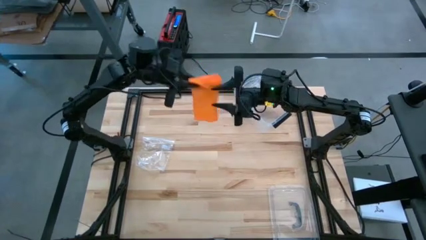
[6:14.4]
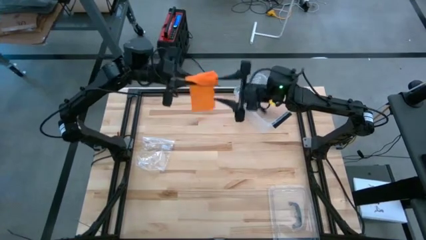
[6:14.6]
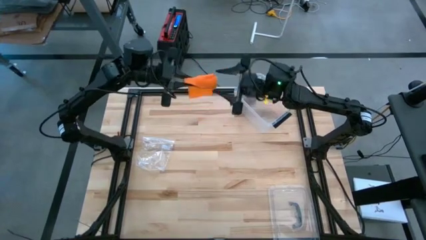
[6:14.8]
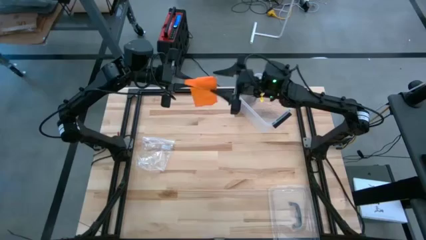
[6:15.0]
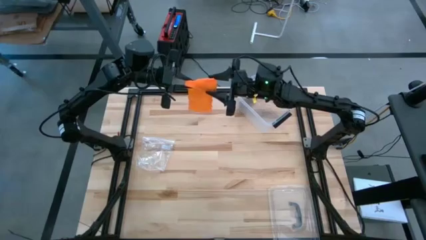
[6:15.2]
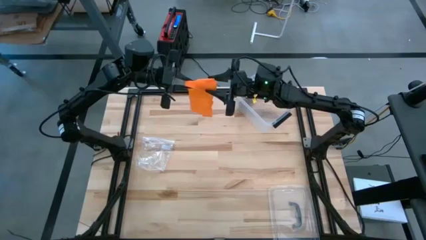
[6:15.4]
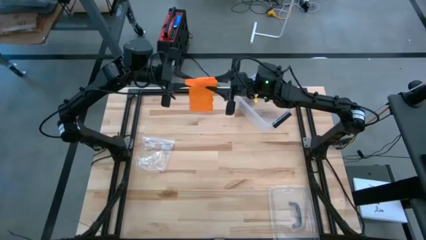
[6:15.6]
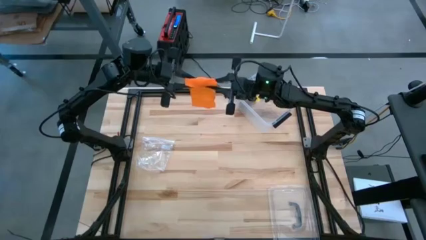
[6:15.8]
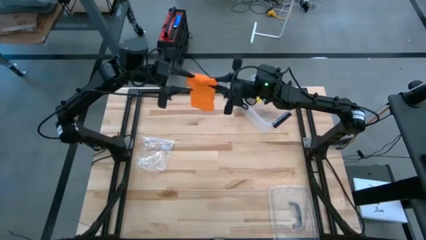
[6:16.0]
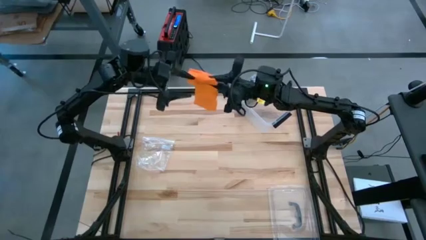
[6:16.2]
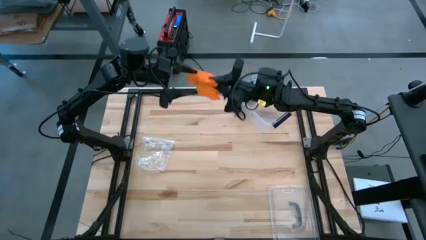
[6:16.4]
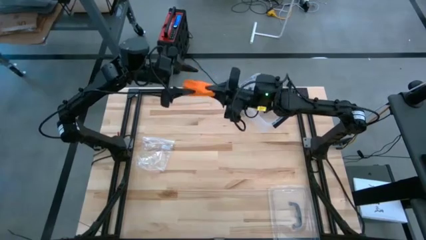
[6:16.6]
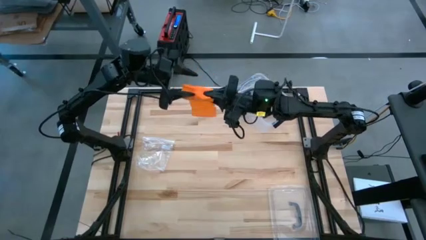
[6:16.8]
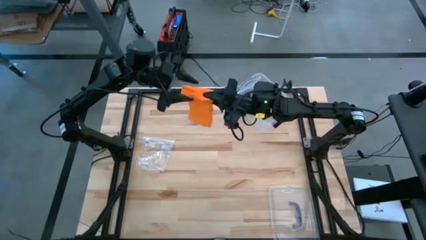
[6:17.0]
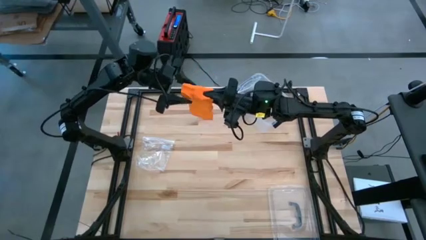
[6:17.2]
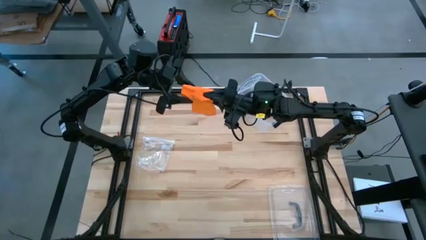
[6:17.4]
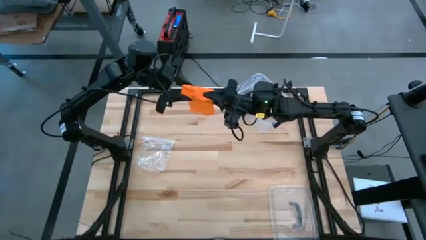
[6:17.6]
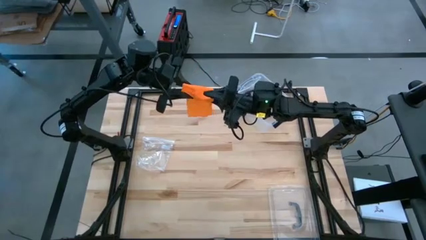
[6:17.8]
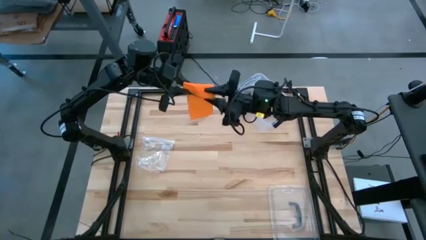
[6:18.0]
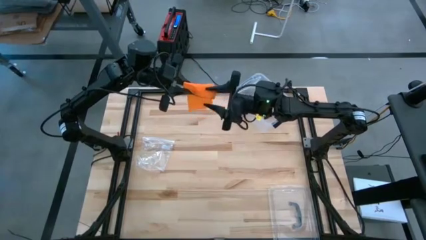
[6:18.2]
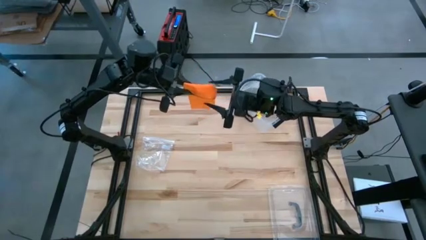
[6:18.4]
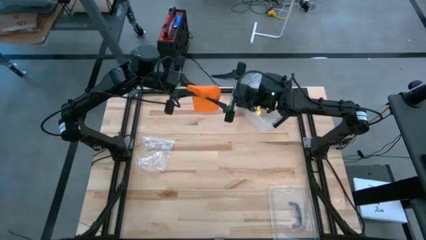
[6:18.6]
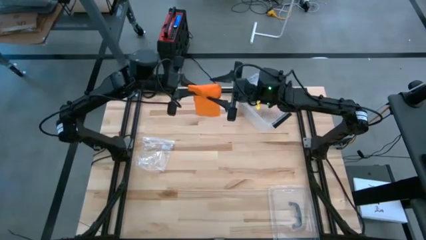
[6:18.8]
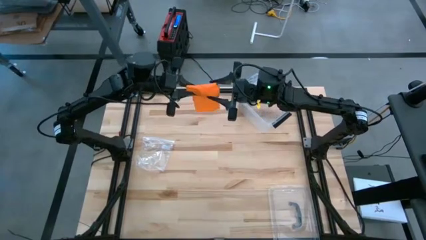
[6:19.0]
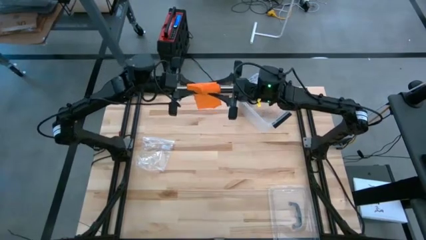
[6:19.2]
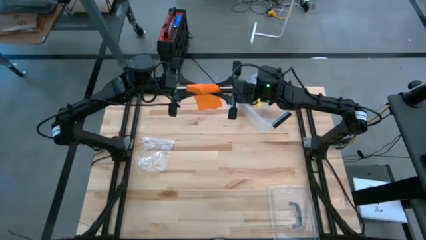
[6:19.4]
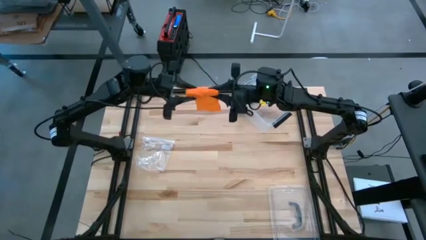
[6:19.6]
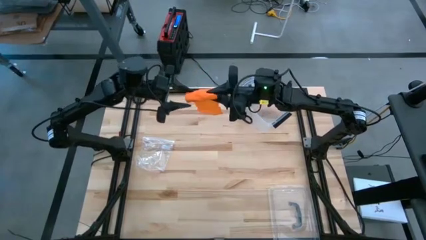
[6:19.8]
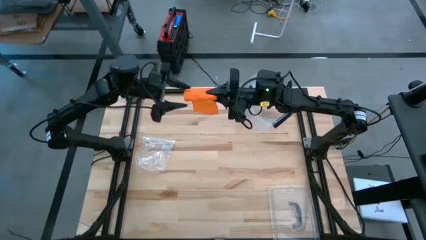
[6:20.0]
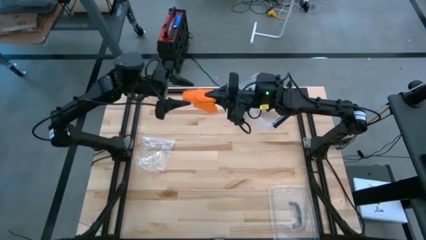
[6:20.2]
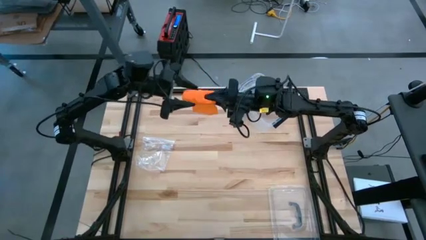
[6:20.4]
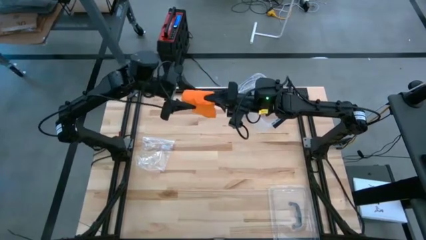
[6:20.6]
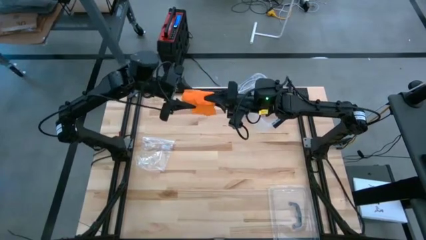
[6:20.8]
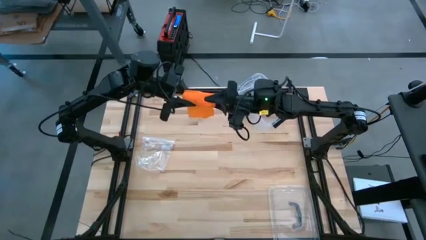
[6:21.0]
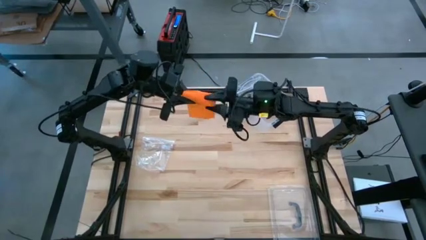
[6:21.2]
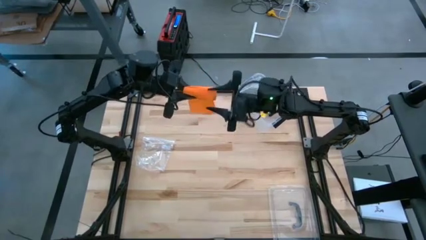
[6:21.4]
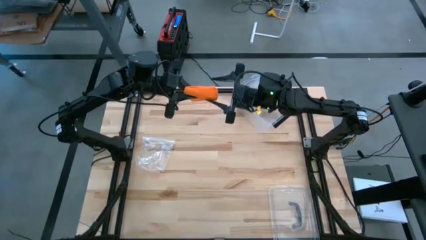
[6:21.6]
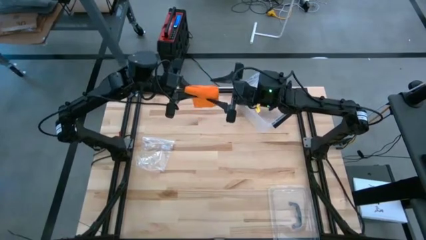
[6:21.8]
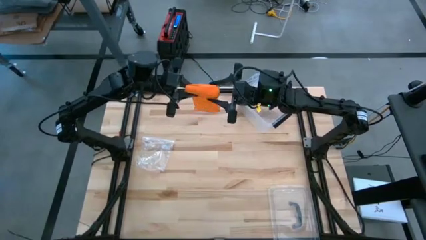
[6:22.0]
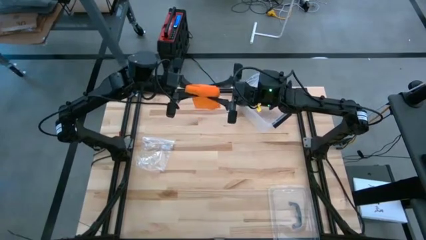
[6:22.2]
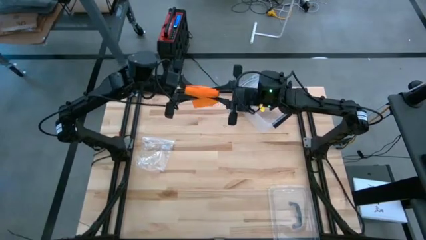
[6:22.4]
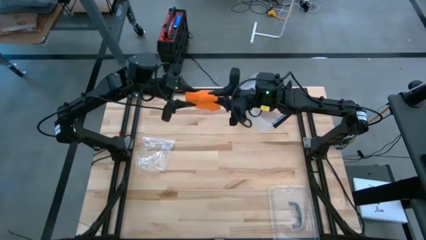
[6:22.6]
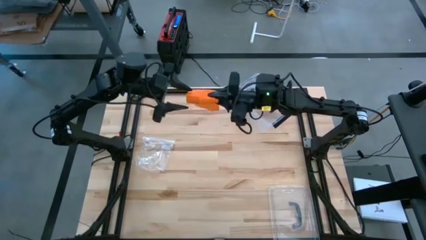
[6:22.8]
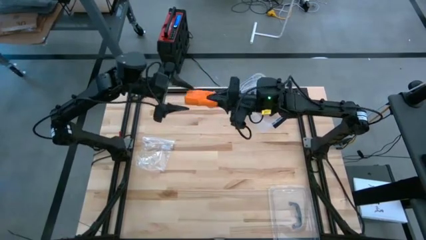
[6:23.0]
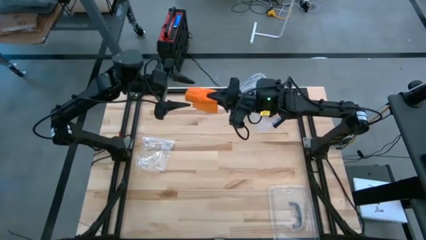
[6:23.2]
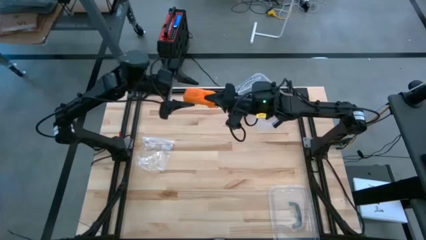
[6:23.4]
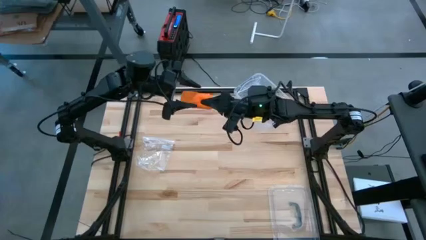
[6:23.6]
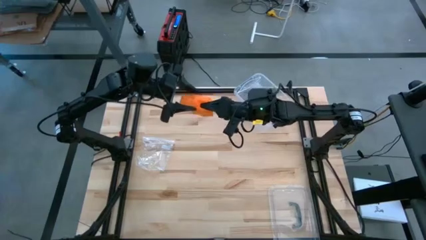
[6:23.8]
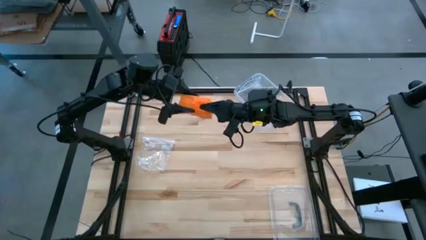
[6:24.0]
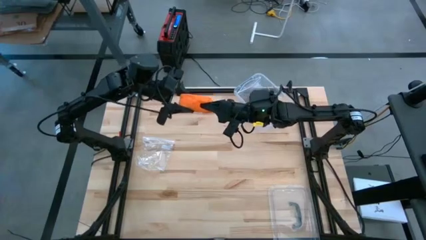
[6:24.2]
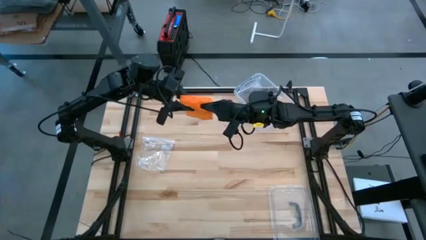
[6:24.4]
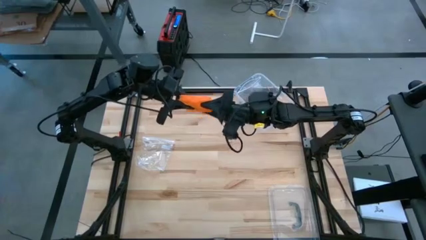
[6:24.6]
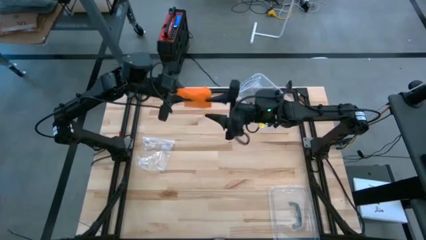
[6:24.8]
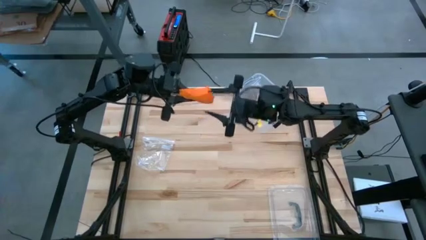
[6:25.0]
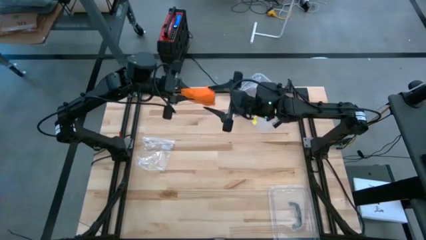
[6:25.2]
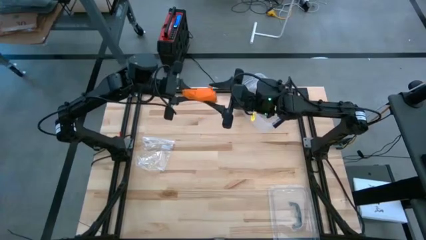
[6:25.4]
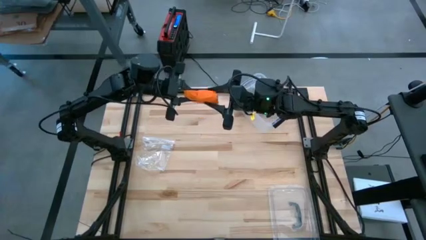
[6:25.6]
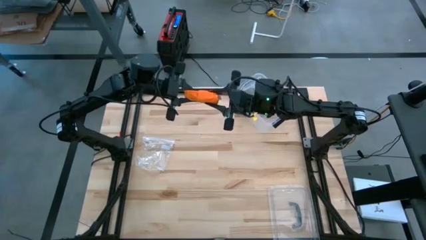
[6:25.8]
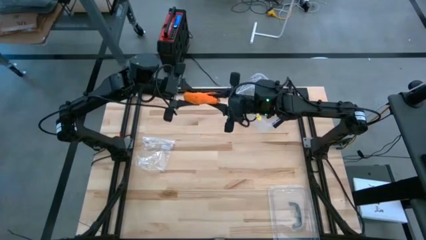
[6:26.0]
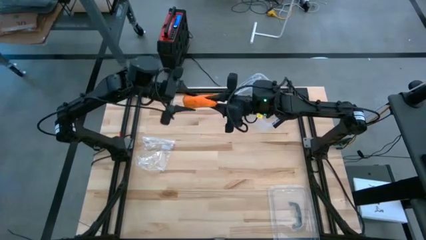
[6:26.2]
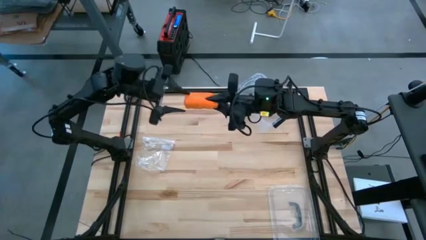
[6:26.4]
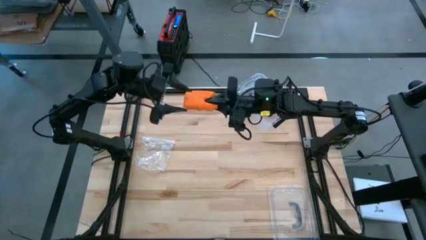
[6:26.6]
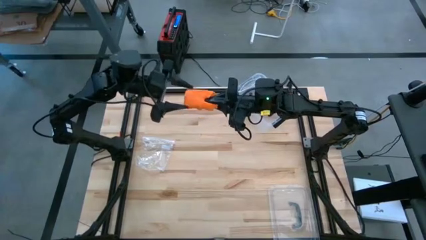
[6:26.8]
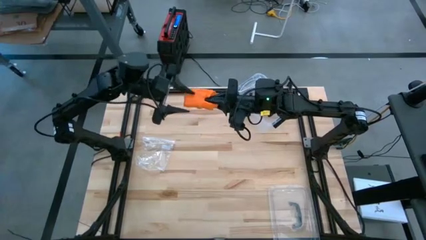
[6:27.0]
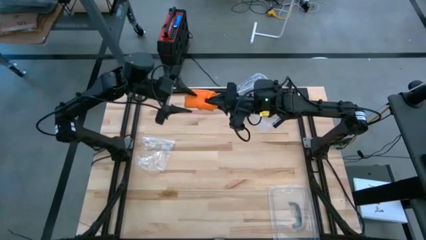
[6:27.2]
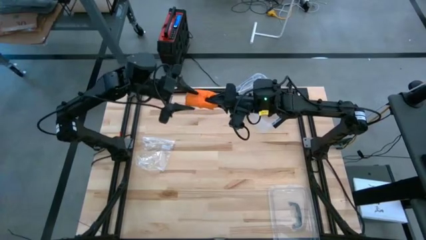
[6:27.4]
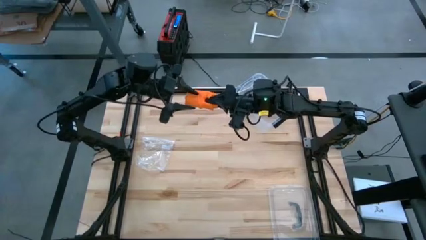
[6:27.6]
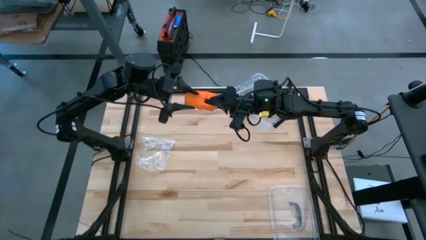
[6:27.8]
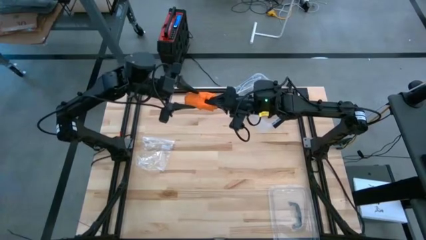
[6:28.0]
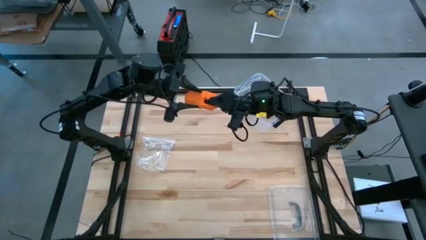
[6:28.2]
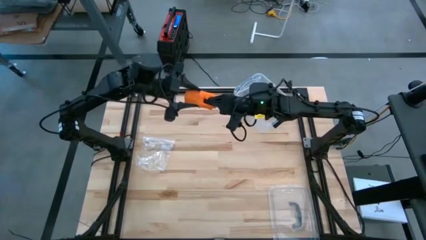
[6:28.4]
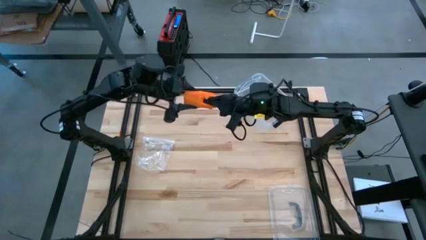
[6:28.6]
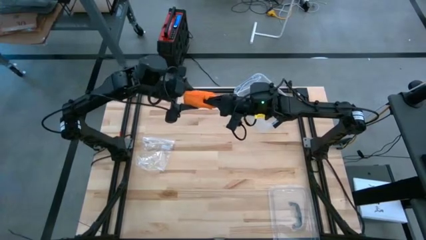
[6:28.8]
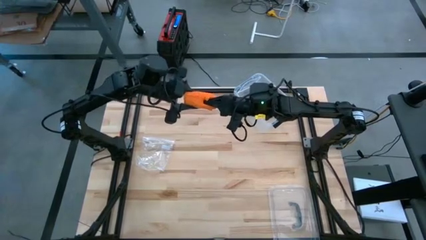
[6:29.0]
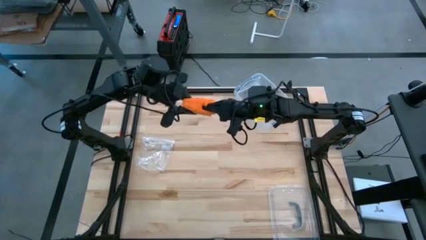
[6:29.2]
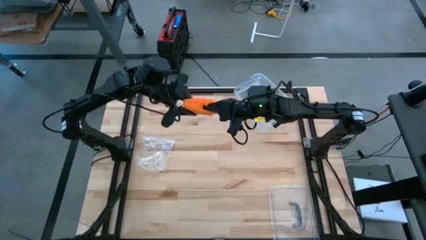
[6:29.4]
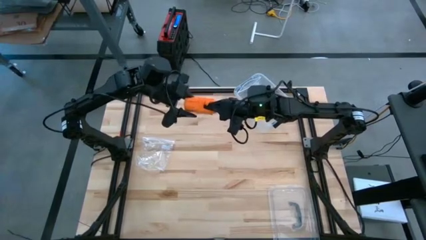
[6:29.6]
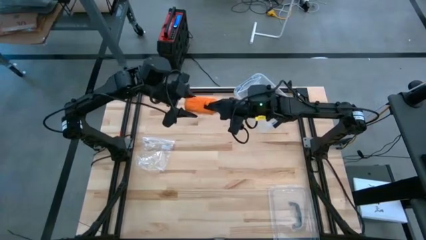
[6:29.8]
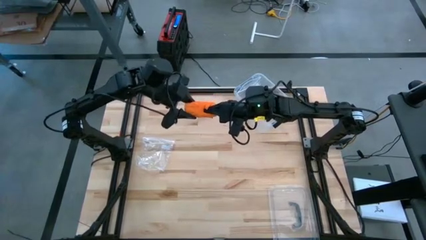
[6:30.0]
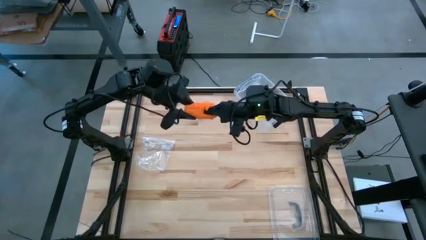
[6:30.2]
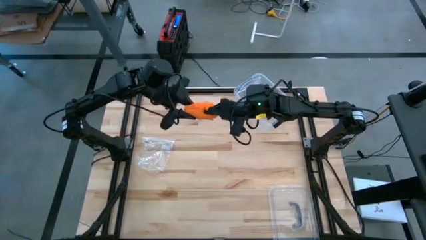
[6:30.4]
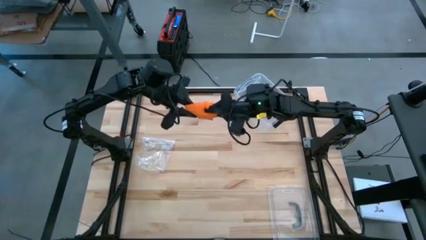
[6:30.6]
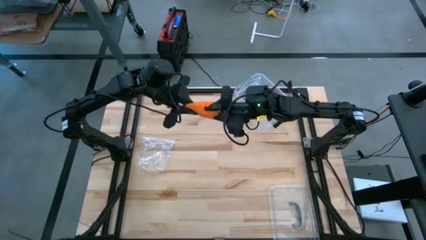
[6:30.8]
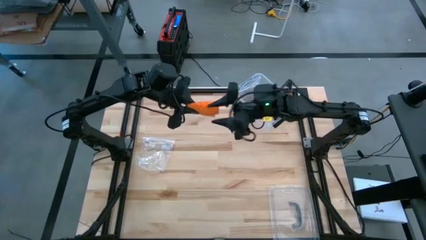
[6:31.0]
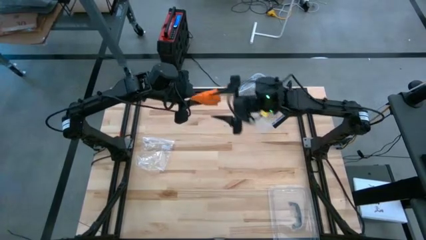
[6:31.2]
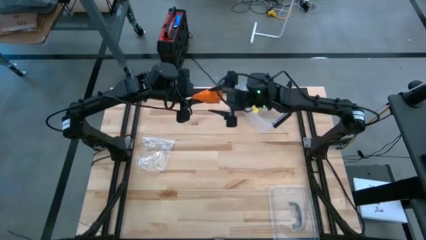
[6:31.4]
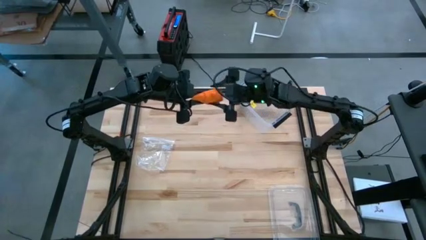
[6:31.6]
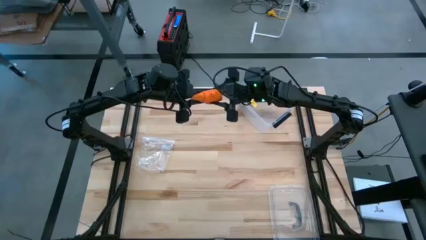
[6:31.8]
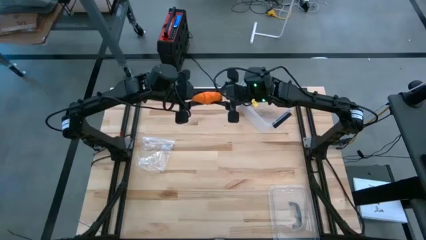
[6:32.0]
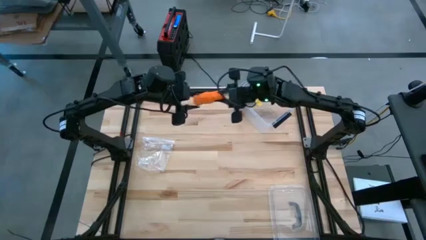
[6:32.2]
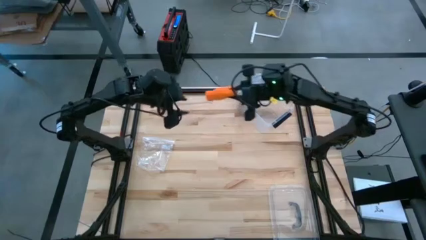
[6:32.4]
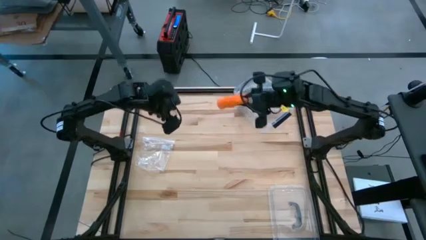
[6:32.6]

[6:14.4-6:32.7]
Task: Roll bandage
Roll the orange bandage on the table
